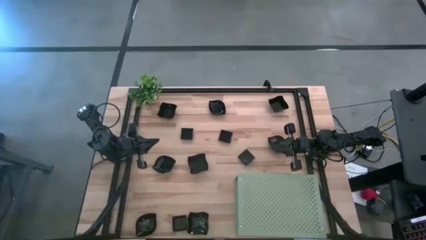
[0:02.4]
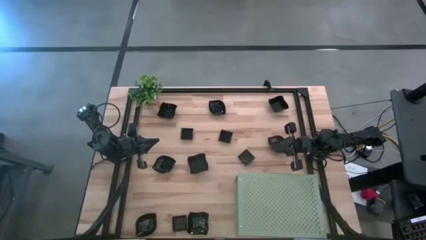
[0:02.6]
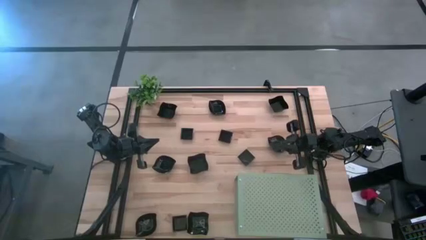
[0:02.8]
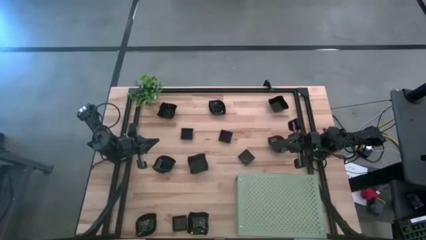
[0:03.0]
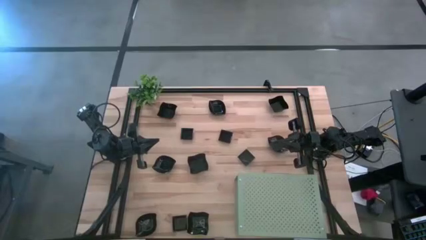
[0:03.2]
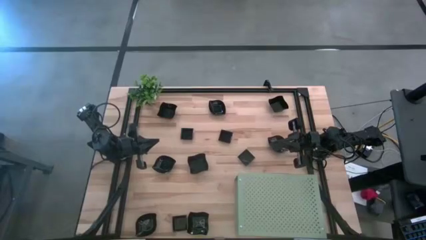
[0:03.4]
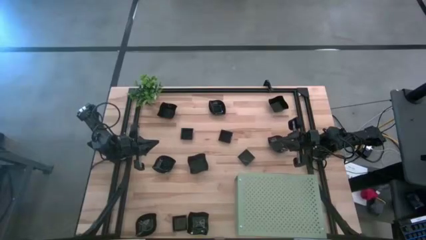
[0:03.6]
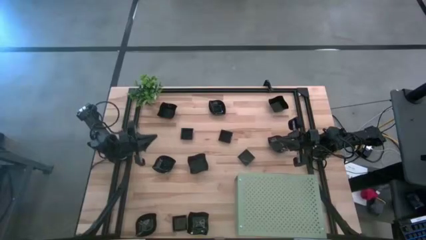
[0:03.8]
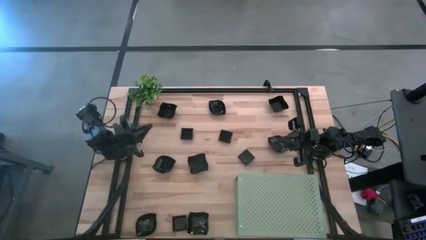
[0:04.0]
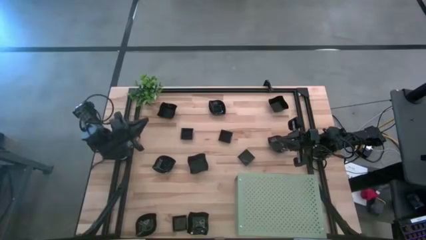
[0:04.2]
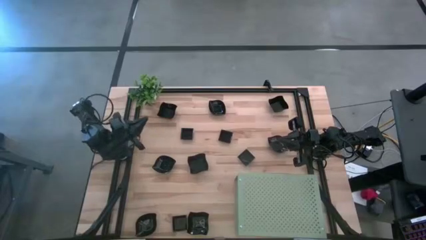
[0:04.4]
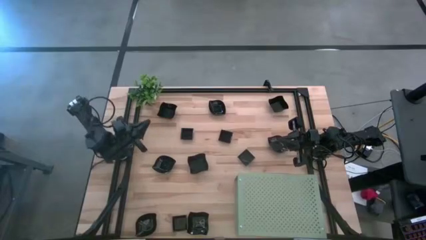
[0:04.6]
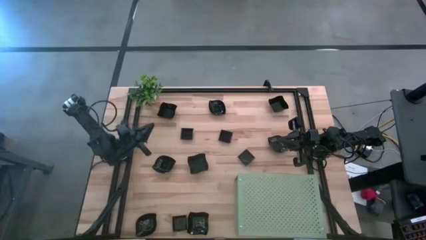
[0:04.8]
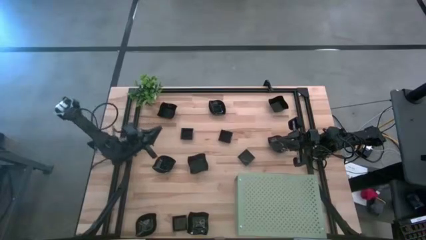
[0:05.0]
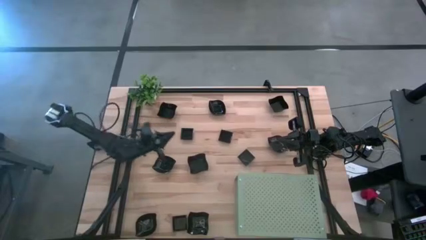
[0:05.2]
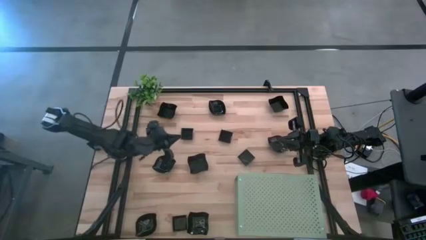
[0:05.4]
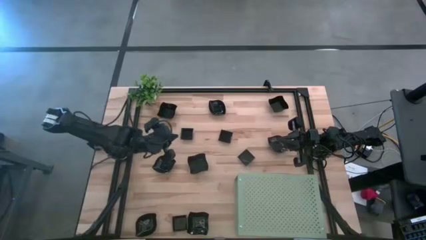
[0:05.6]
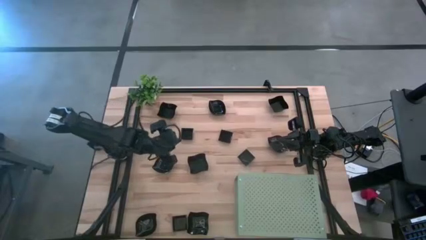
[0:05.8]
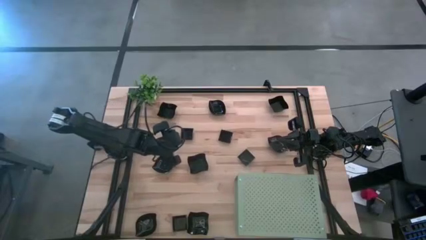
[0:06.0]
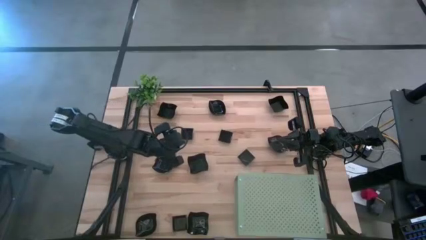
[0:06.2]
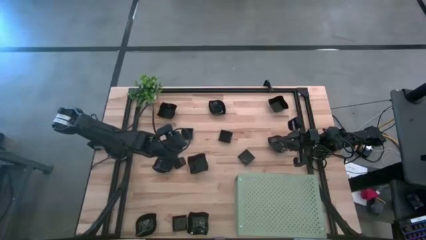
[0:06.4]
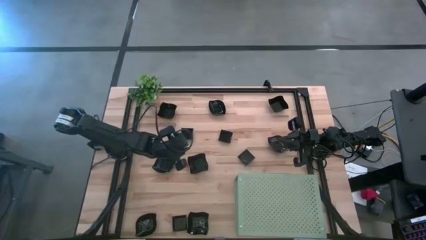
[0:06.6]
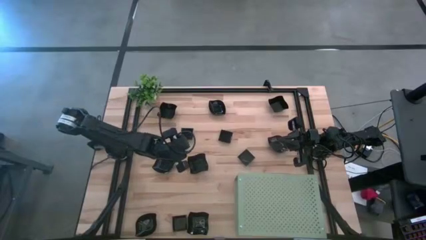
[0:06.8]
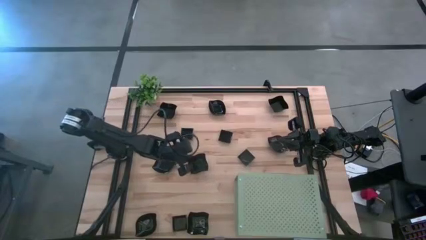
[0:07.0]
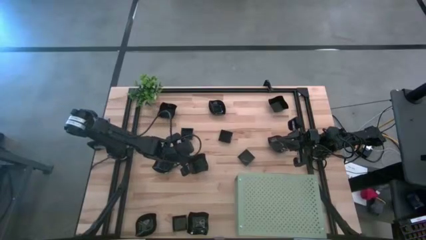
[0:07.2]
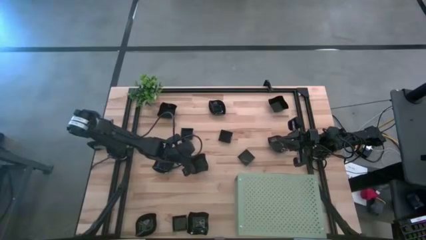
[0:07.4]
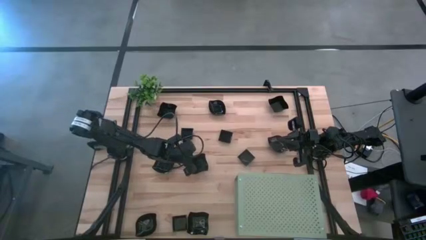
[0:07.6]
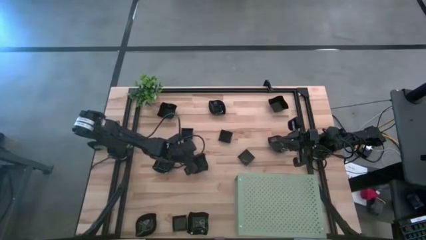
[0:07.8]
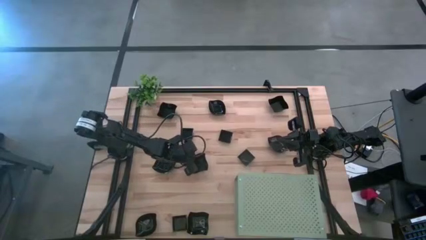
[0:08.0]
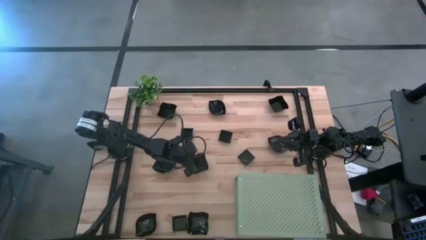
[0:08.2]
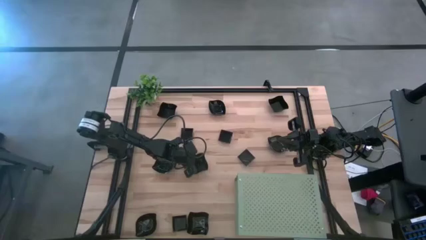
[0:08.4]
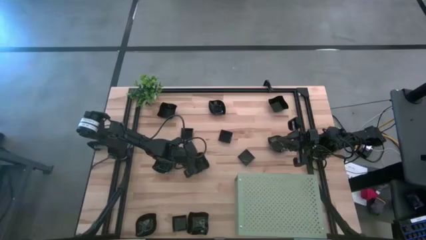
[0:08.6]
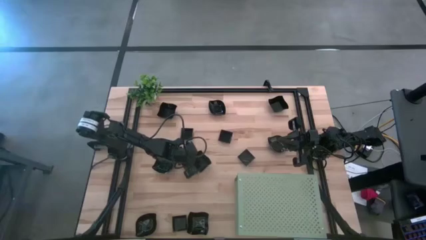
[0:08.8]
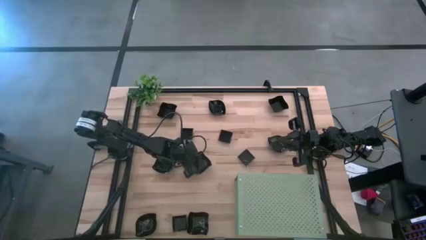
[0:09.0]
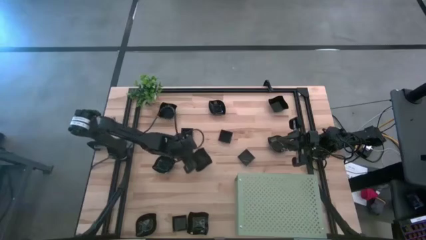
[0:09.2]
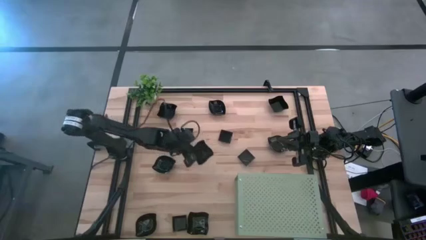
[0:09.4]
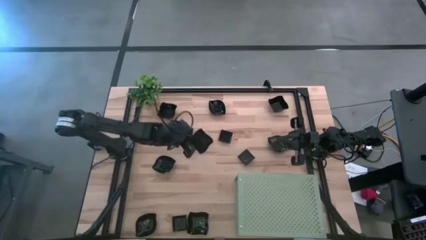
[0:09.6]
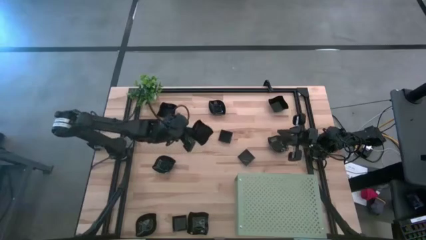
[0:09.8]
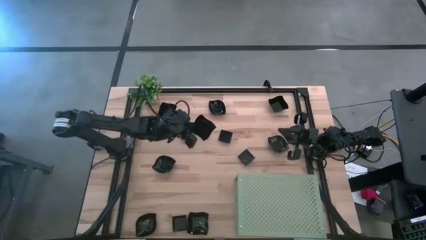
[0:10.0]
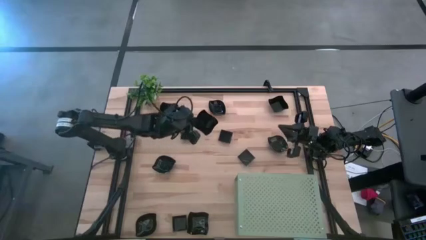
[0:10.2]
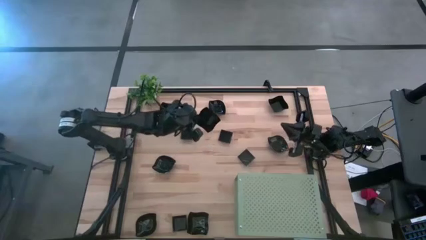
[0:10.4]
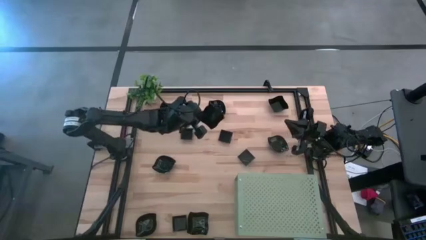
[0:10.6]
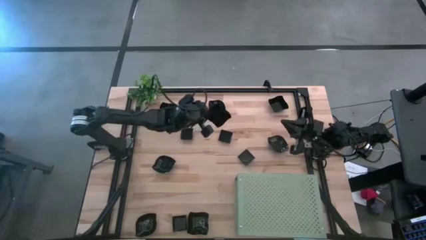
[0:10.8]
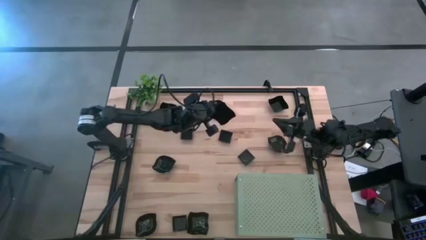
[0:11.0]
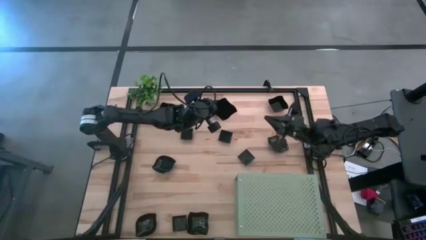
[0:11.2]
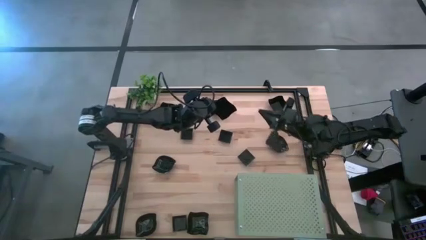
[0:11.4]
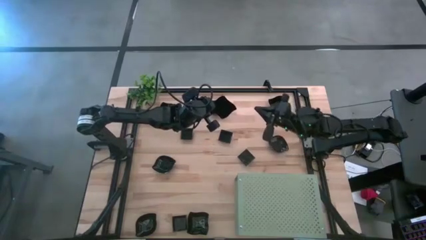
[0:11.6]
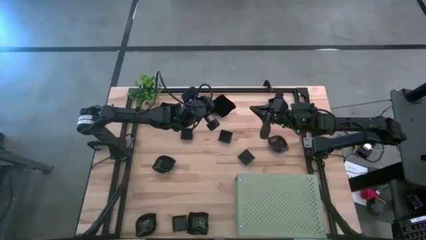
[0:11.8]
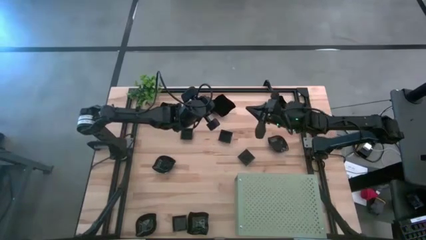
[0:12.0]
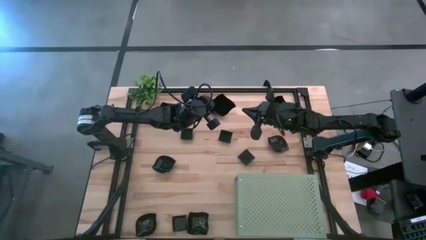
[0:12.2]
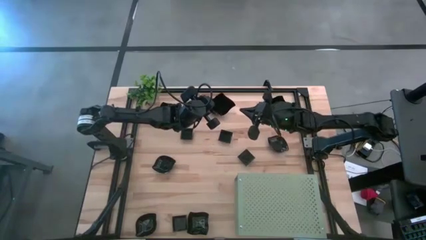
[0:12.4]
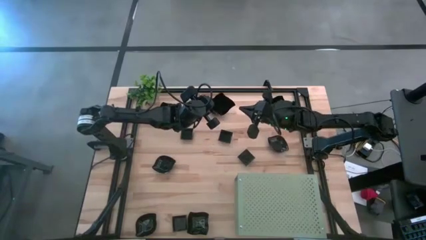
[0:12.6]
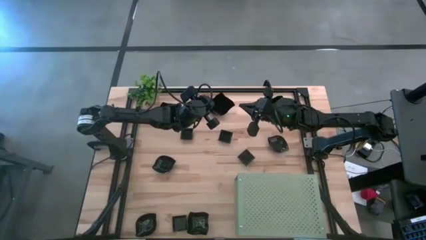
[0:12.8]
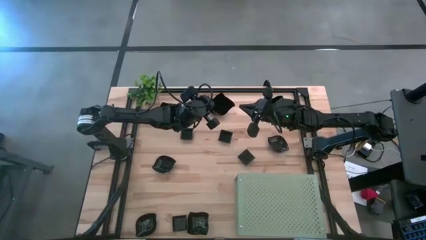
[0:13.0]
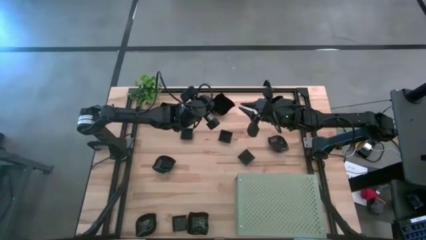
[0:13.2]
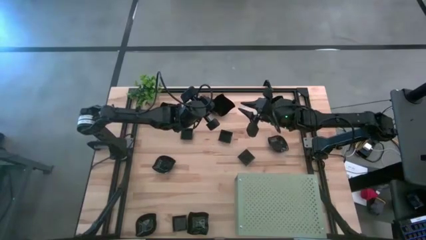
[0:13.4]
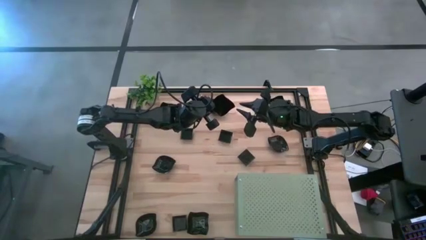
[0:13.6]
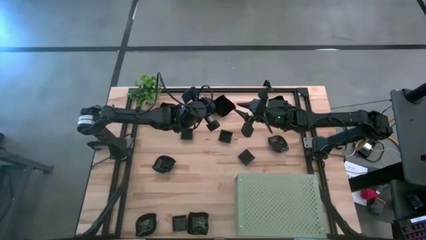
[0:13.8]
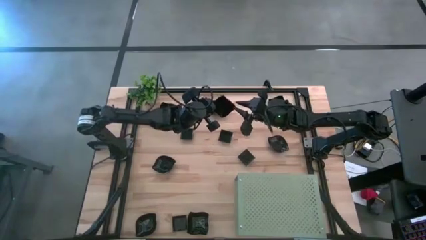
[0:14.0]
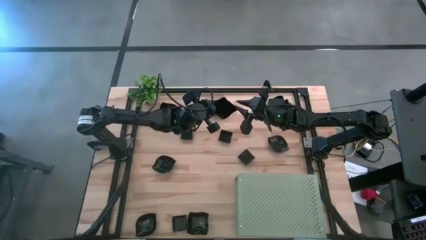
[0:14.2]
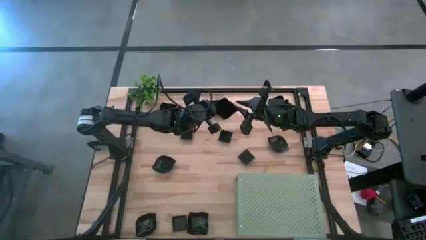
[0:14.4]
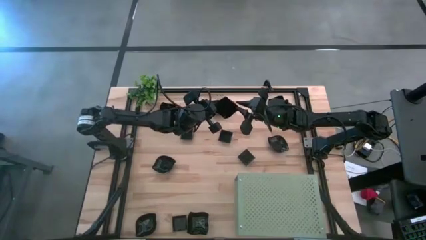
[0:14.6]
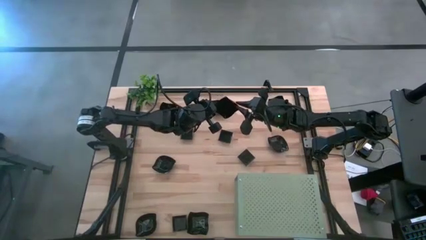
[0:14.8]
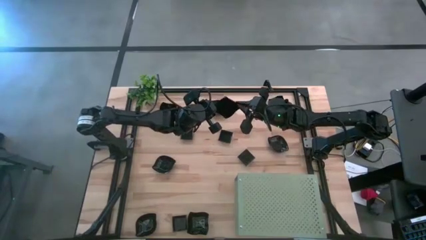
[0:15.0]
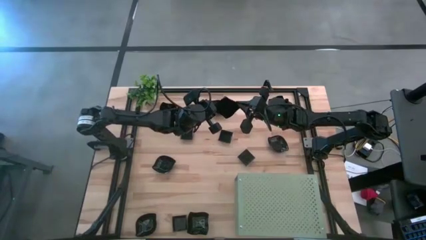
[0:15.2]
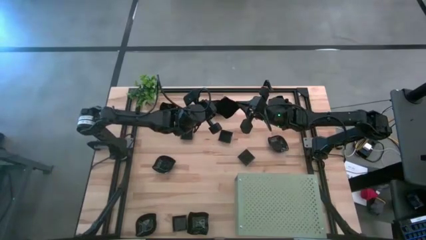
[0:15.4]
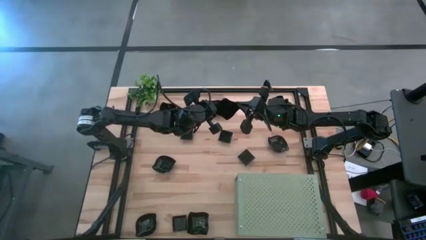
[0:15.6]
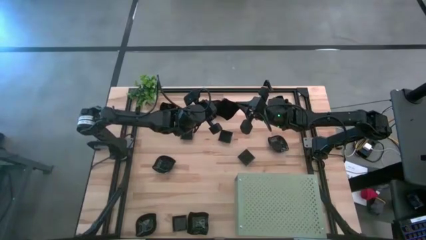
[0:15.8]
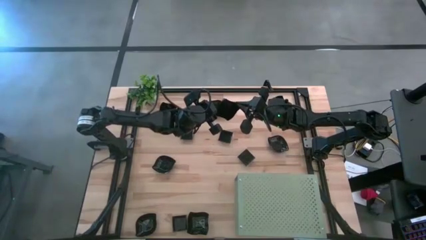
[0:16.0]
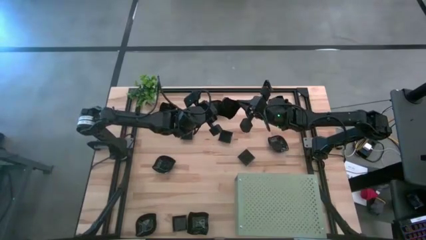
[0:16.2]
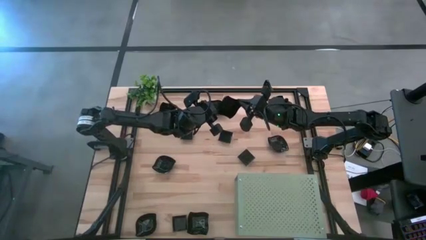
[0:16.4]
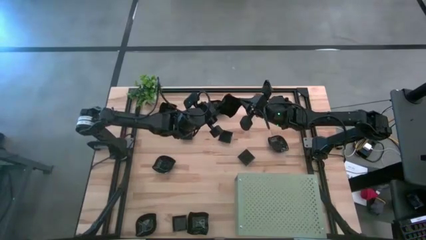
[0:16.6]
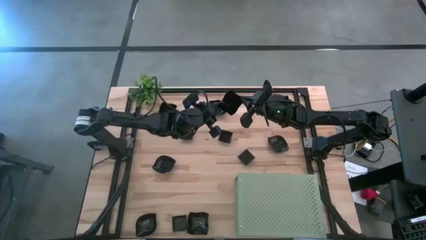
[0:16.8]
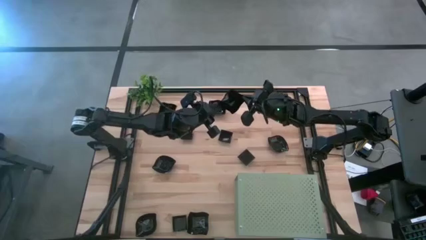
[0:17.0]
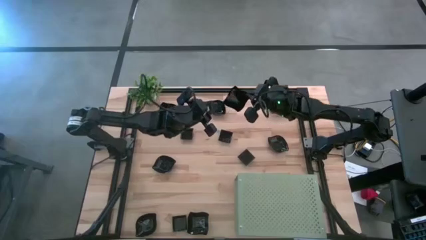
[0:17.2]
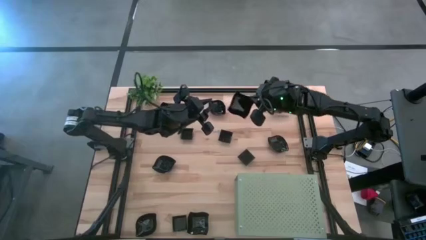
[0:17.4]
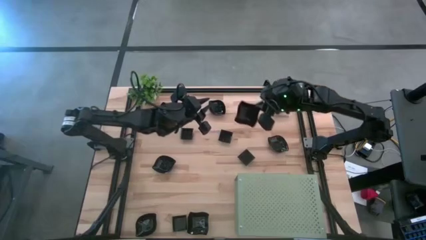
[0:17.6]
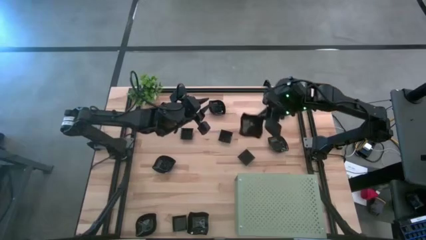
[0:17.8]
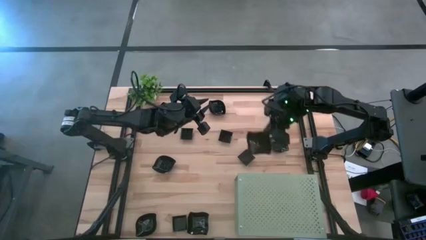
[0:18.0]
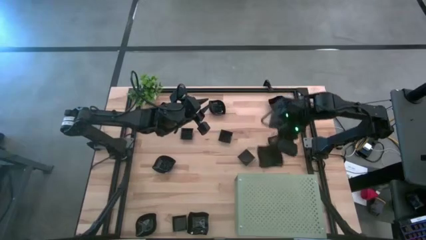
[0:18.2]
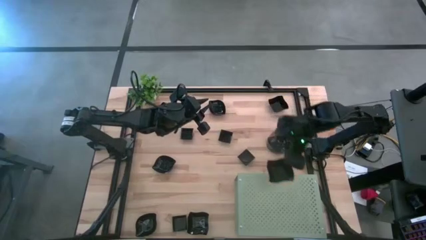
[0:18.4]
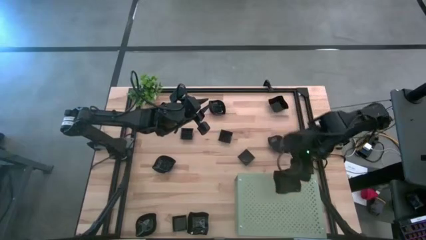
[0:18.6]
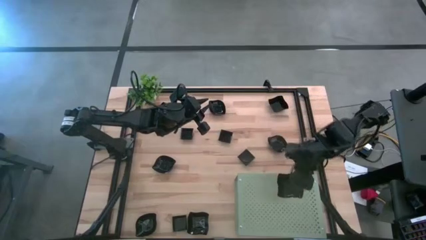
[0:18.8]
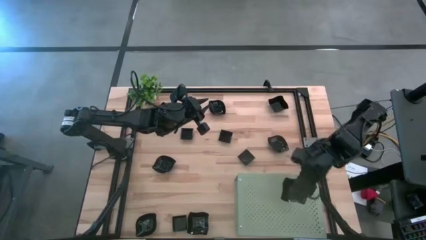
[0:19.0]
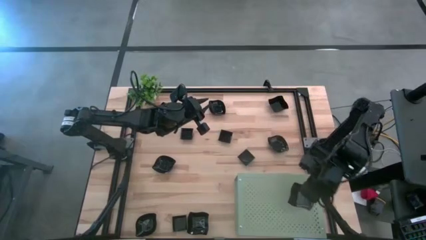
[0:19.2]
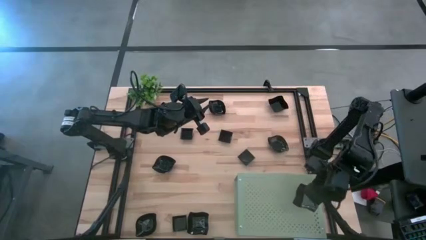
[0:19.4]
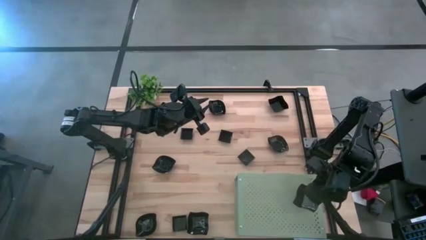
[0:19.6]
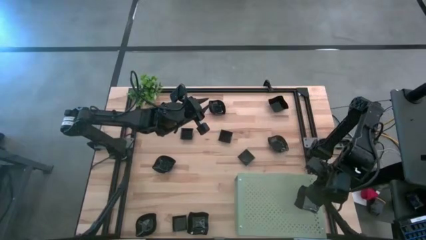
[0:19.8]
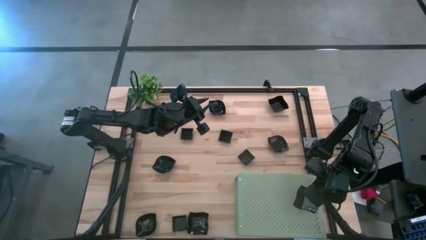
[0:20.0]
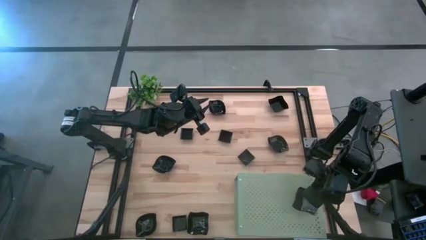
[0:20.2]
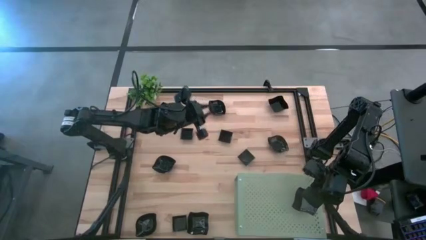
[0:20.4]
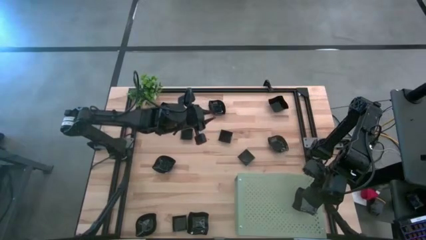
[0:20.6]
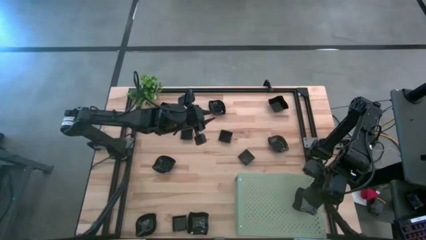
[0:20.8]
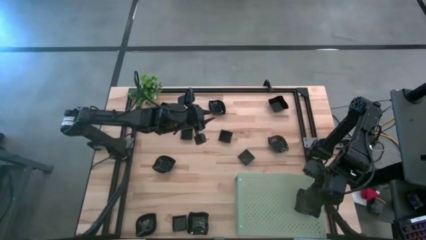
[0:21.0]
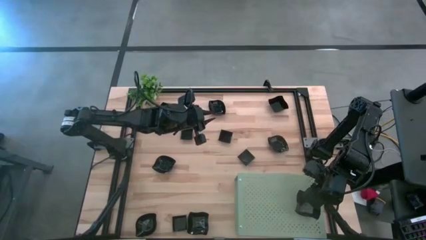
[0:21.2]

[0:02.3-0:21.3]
Task: Pick & Place Mini shaped plates
Put the distorted square plate on the shelf
